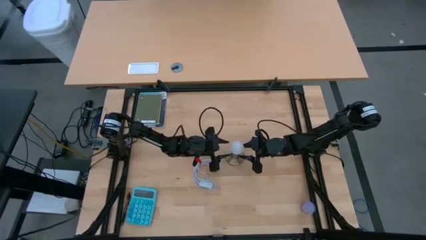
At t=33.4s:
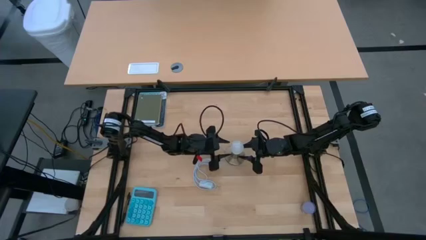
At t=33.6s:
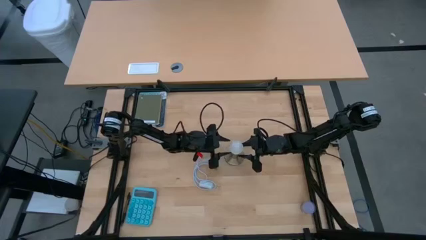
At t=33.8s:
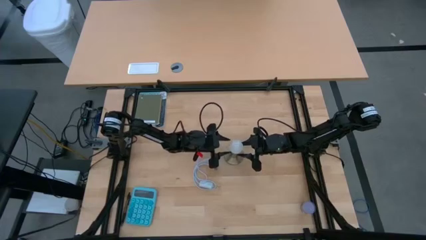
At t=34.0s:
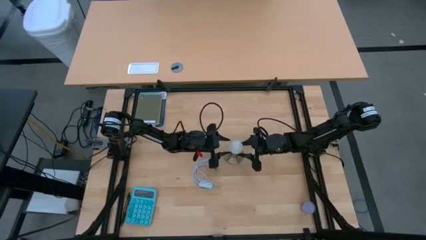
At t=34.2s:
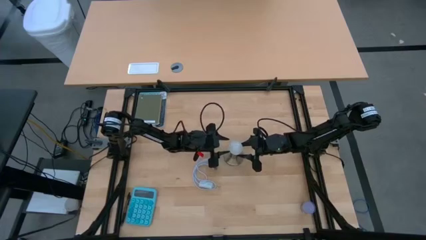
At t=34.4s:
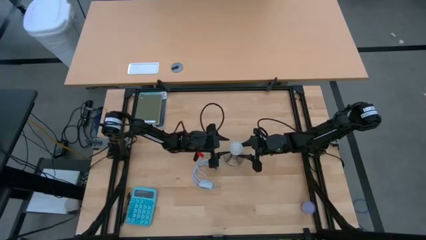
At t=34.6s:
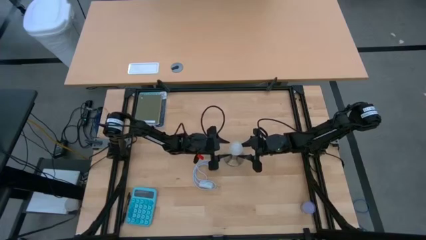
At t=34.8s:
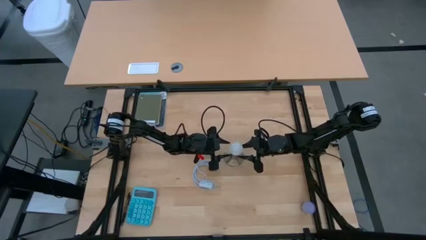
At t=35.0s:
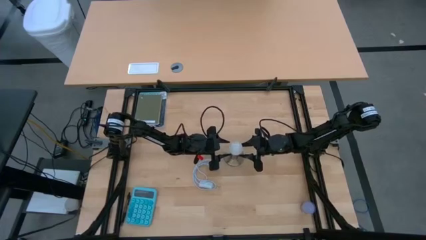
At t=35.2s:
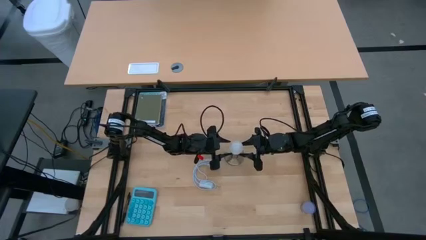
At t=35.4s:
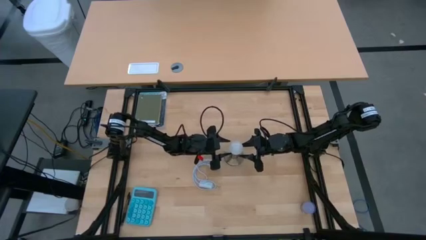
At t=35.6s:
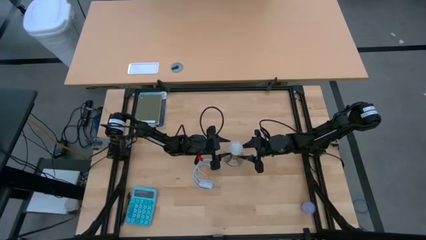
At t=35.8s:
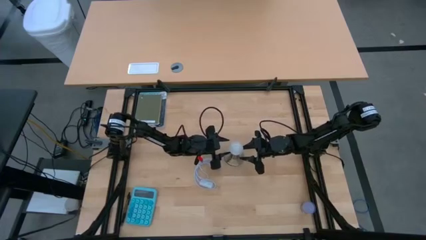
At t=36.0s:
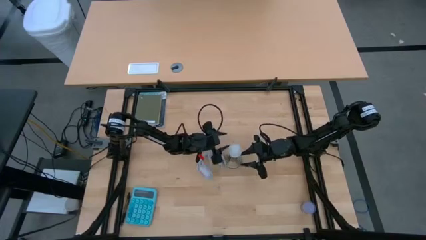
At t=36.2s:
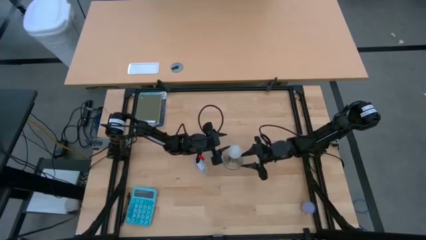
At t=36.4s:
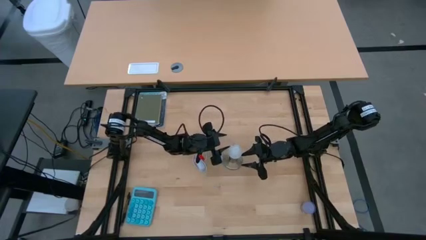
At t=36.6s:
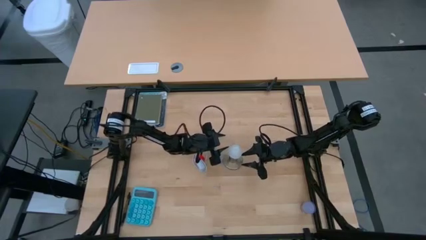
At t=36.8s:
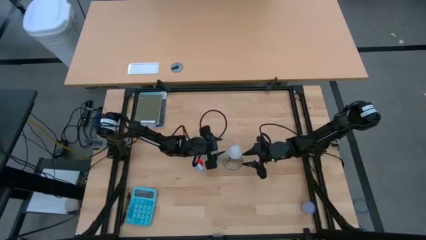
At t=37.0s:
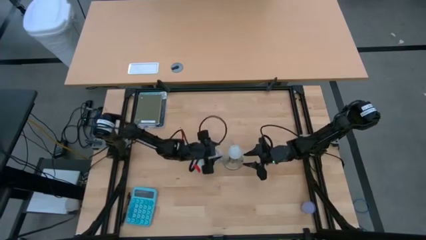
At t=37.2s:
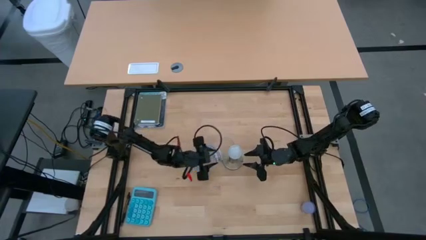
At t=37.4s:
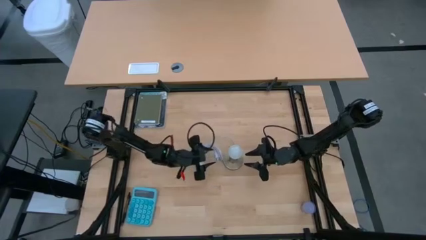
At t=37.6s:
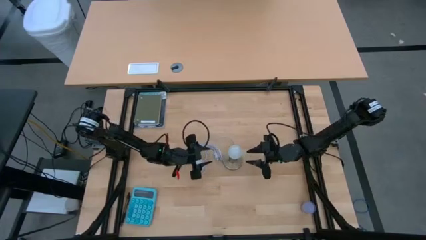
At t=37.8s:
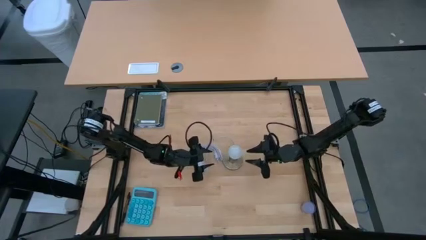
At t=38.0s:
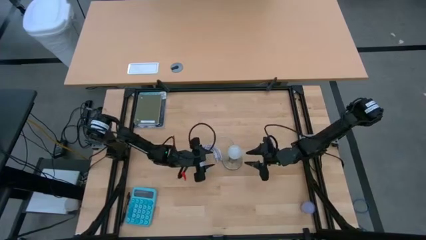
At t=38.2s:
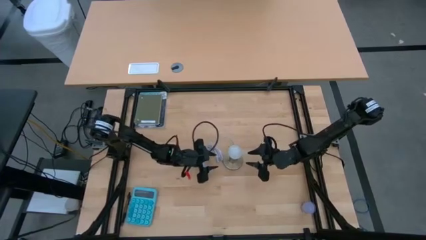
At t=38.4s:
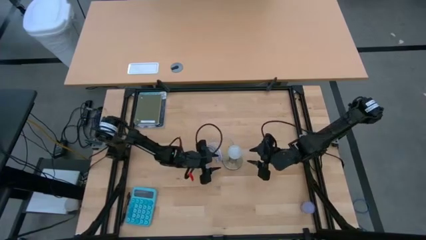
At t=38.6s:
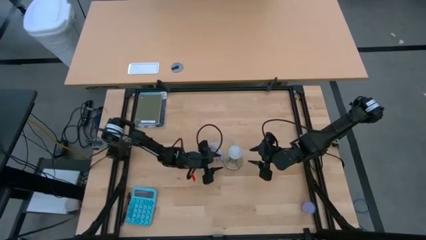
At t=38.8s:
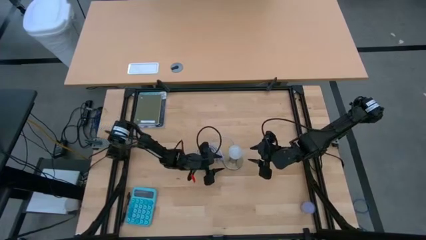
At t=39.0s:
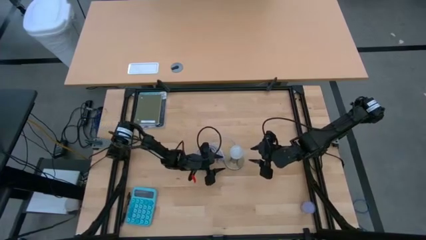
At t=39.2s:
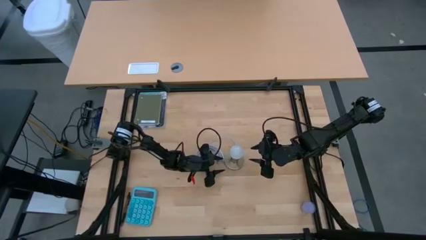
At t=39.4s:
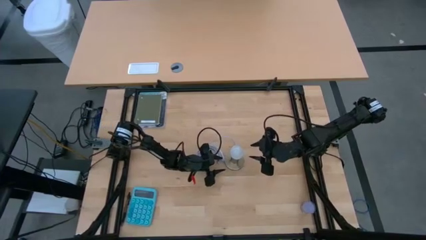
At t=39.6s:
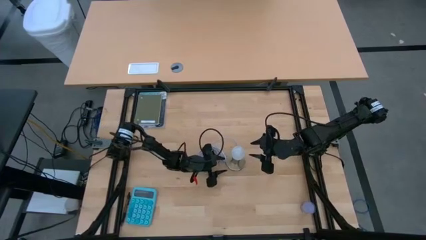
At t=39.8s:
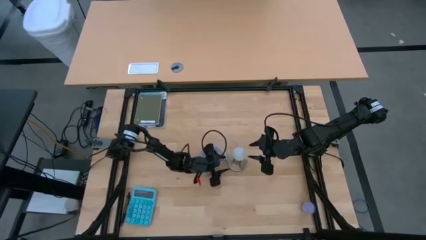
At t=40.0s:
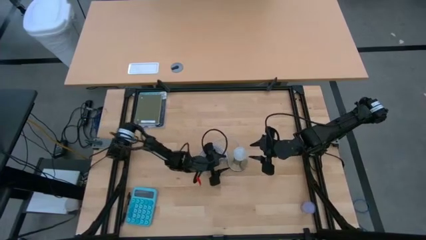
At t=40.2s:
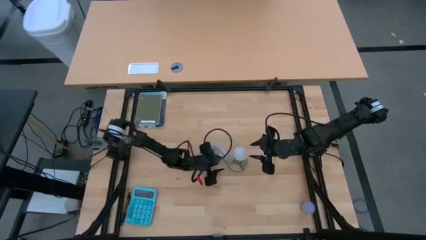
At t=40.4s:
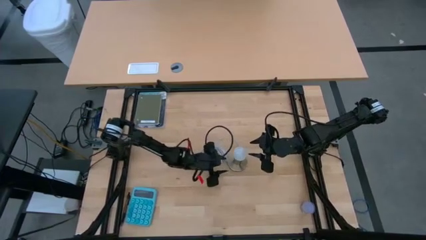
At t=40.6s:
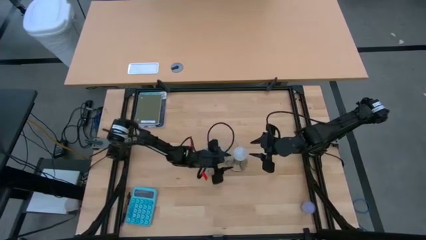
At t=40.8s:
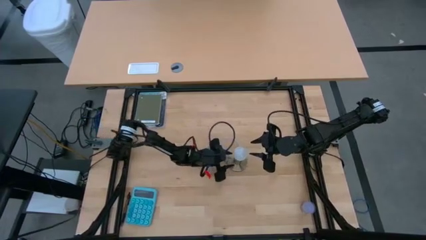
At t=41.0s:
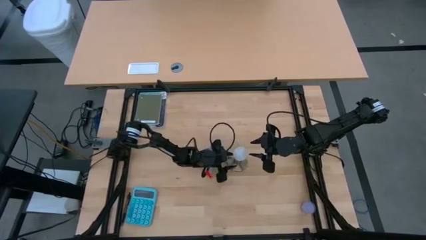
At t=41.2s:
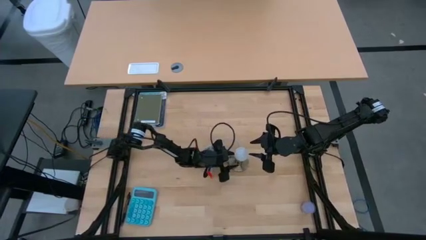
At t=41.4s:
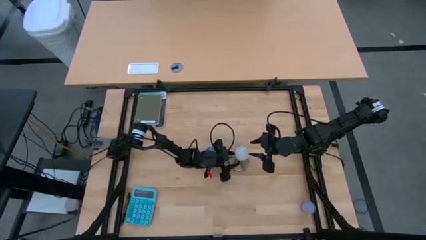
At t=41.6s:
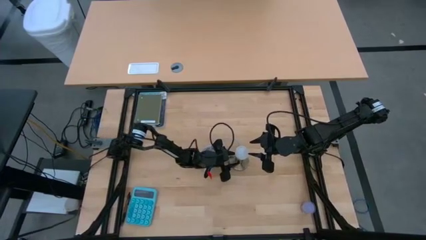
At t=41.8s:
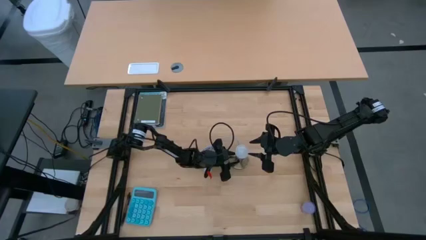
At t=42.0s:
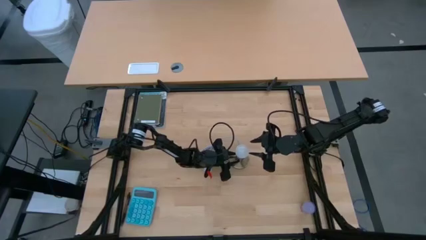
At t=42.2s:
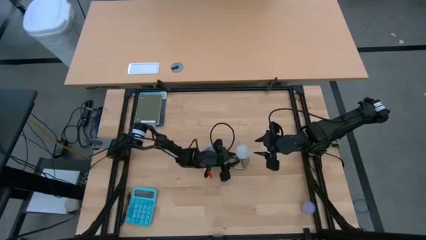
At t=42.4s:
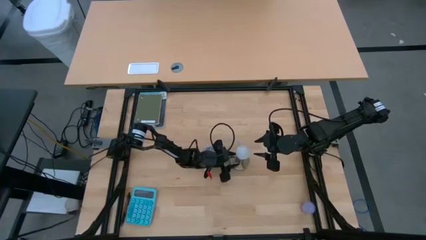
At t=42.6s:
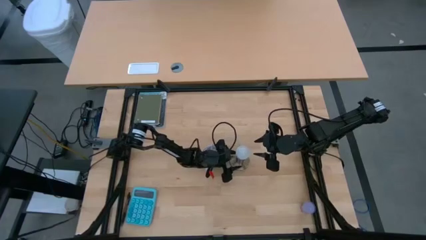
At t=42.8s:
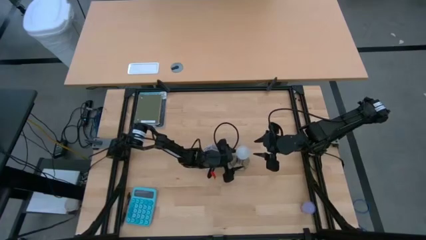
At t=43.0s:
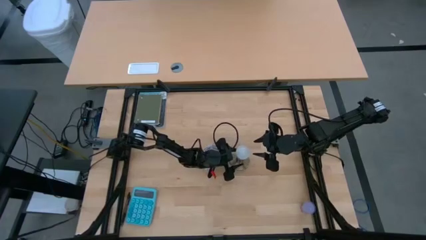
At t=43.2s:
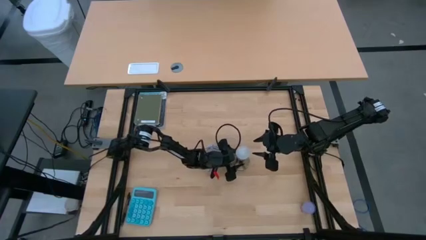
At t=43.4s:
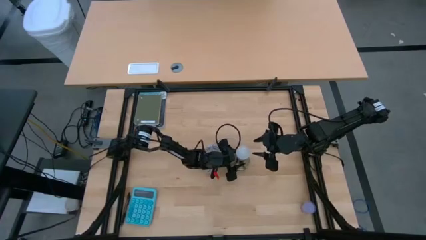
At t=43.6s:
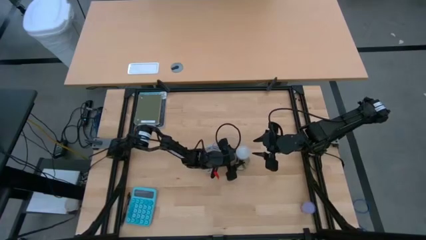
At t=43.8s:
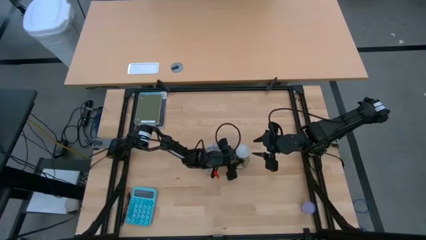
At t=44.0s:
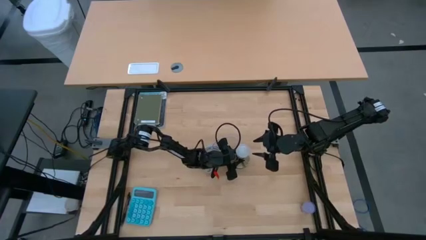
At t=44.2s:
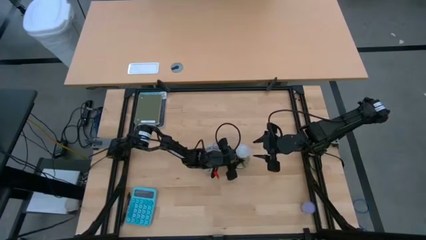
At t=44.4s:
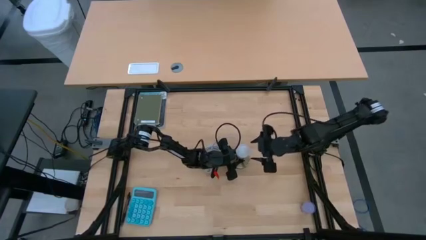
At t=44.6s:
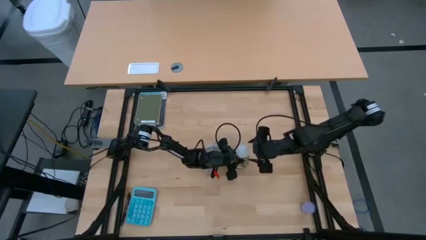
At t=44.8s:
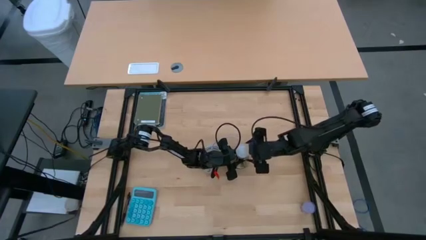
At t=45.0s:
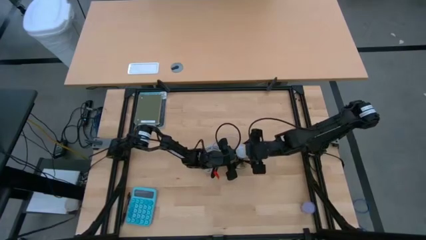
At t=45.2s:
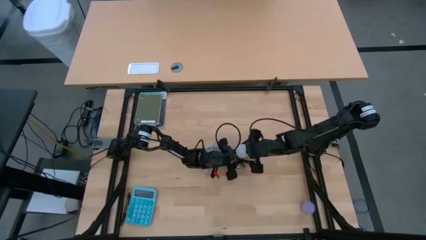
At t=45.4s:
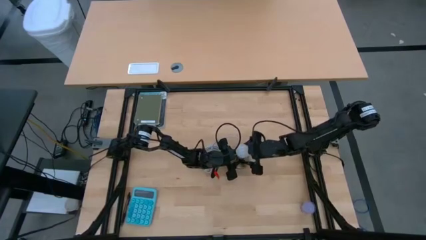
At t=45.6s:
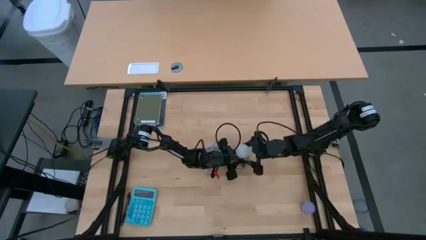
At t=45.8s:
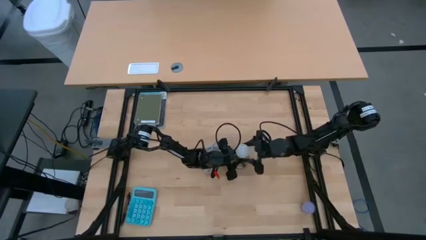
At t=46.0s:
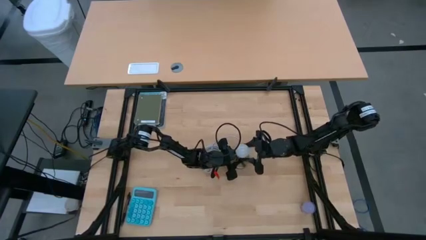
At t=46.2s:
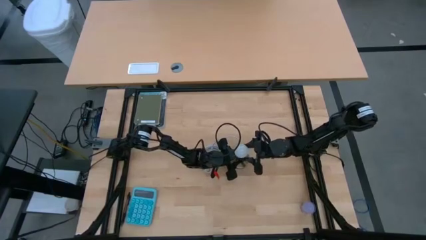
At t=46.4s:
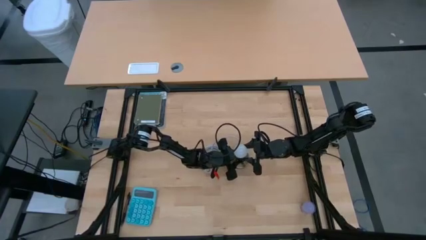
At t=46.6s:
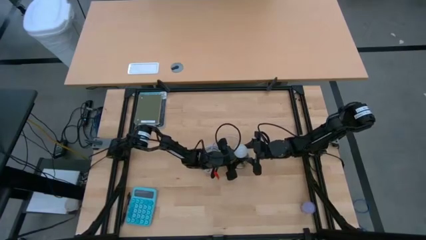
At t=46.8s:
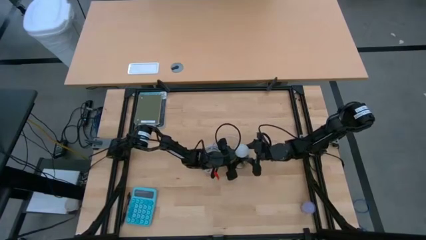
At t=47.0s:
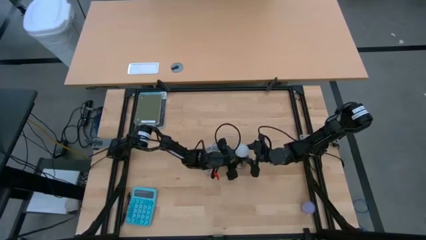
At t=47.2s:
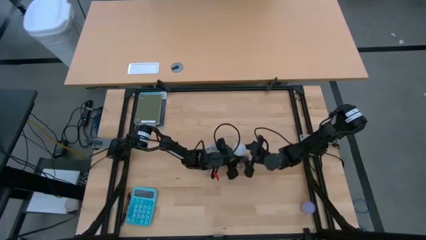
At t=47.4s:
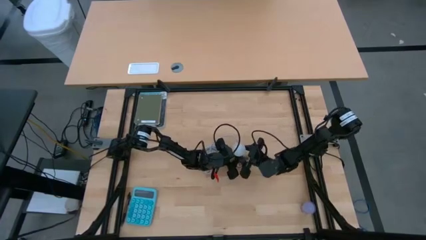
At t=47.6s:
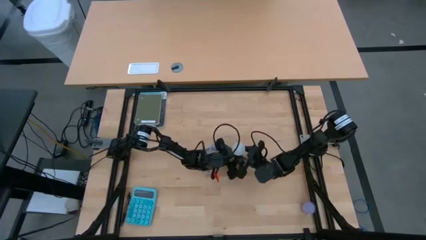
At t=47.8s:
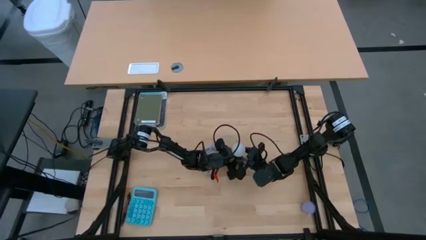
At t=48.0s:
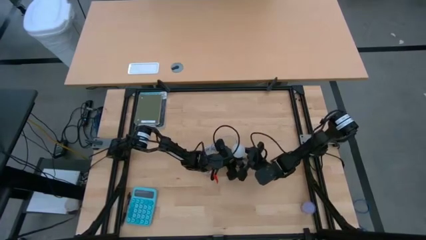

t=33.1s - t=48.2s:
Task: Screw lightbulb
Insert the lightbulb into the lamp
